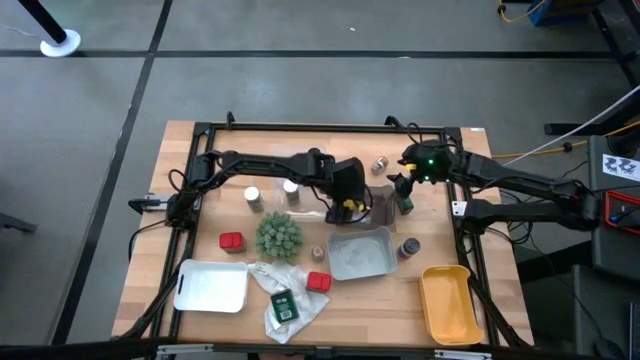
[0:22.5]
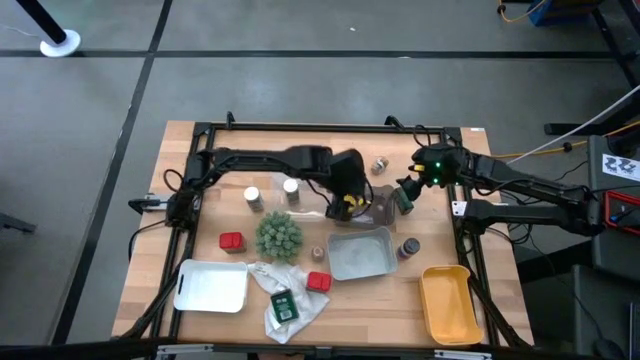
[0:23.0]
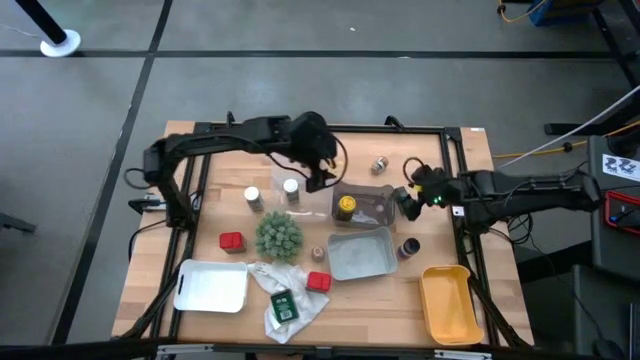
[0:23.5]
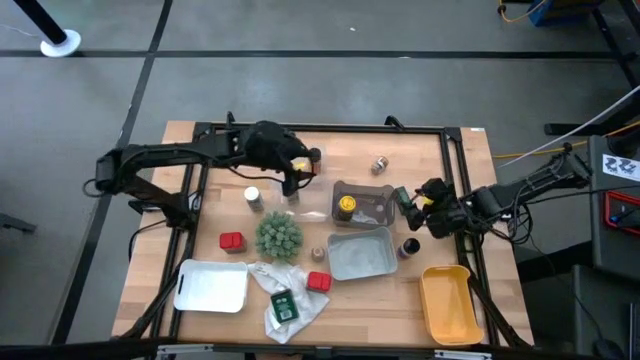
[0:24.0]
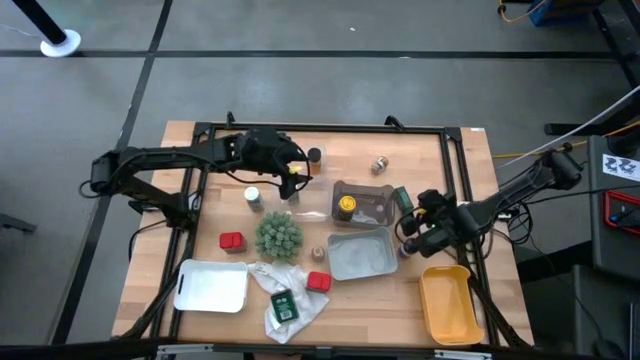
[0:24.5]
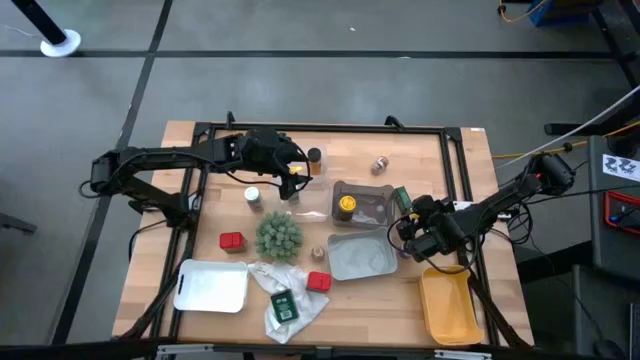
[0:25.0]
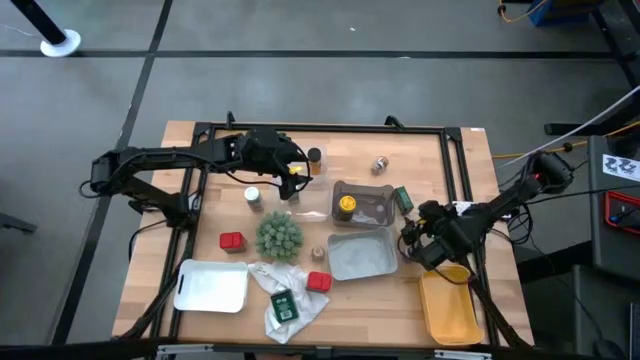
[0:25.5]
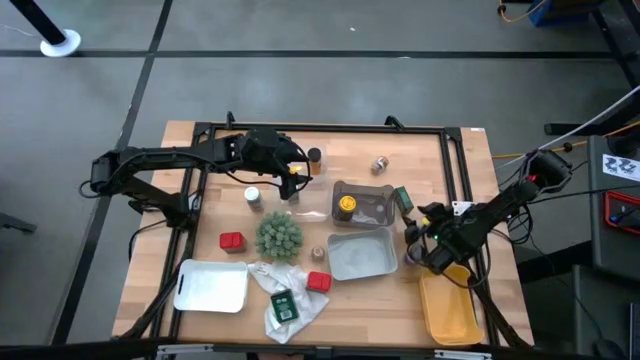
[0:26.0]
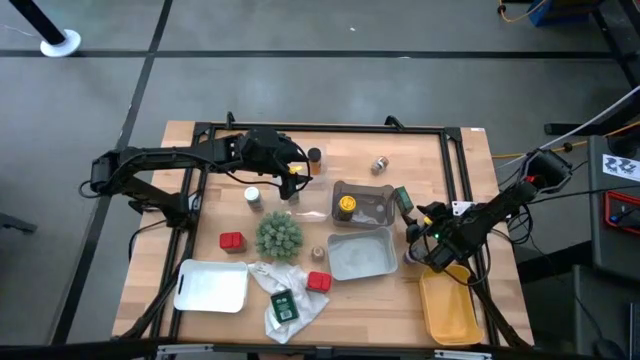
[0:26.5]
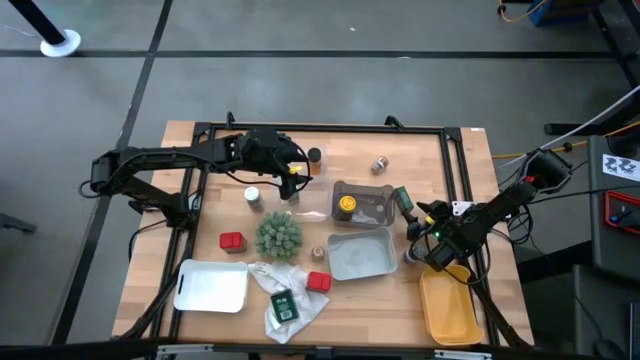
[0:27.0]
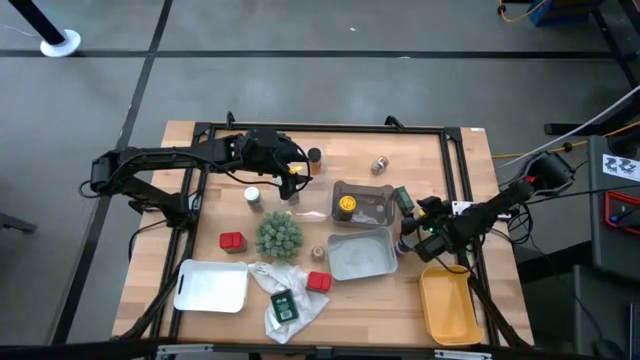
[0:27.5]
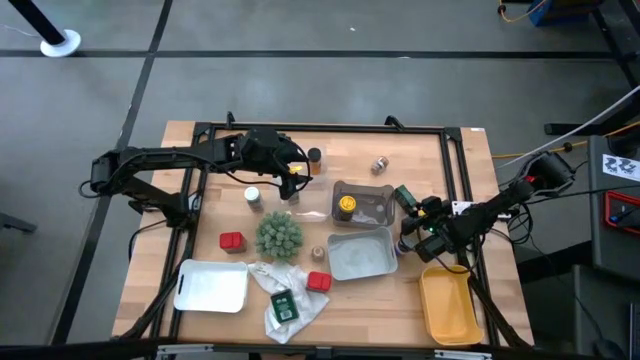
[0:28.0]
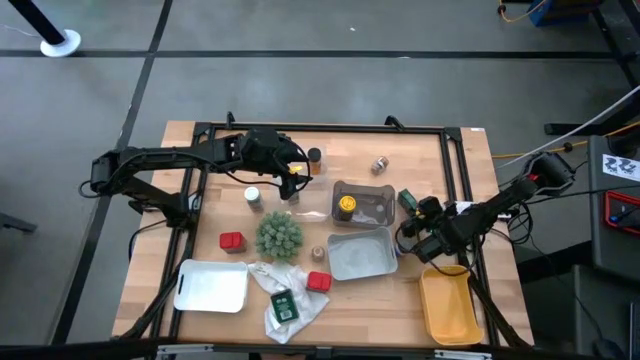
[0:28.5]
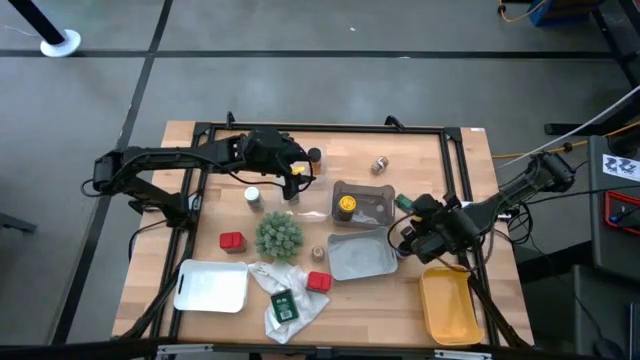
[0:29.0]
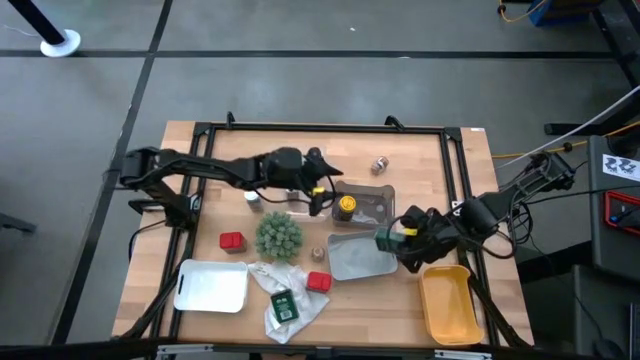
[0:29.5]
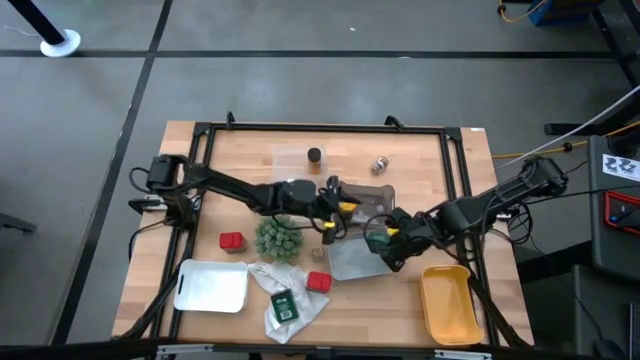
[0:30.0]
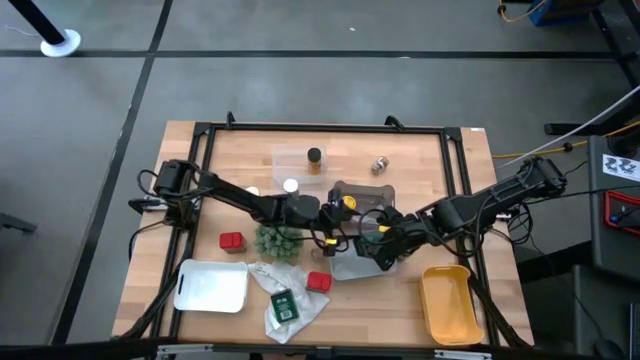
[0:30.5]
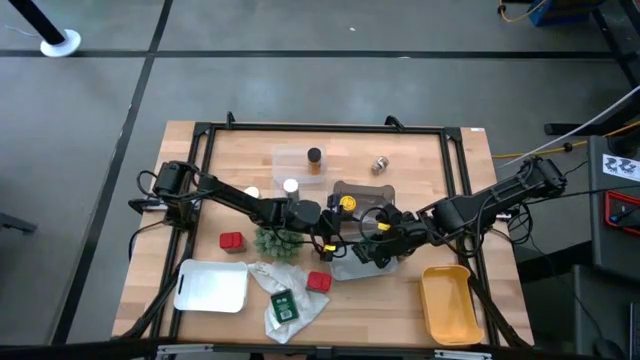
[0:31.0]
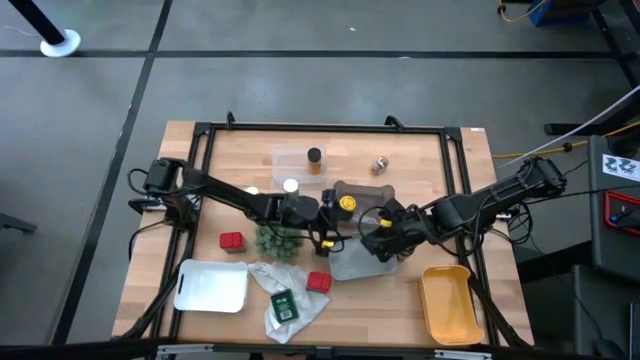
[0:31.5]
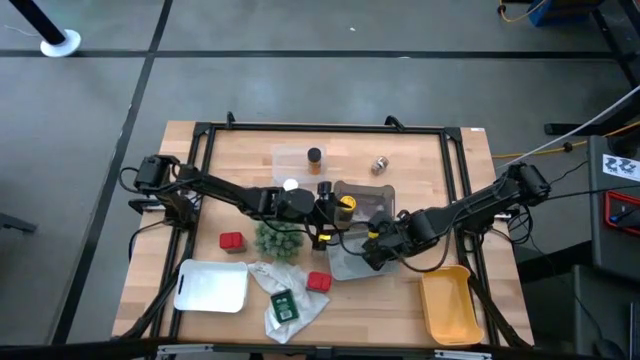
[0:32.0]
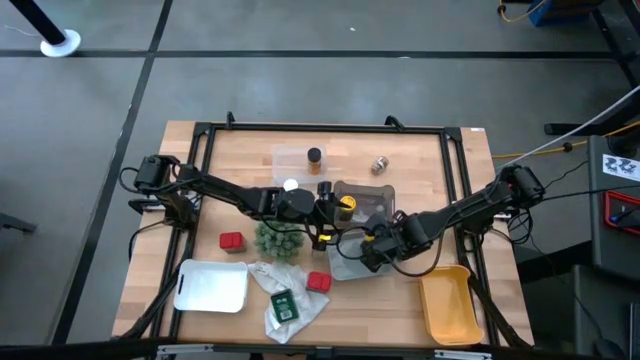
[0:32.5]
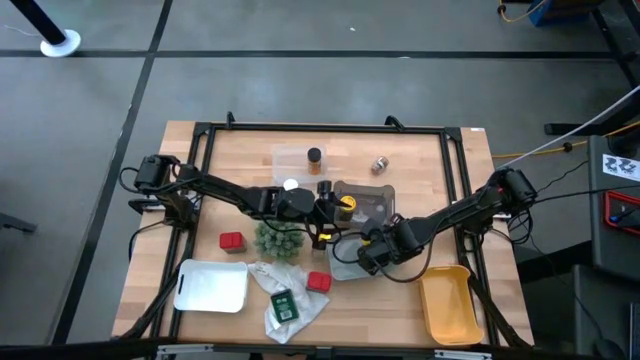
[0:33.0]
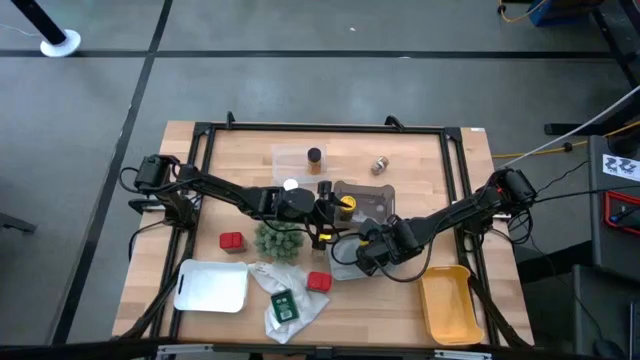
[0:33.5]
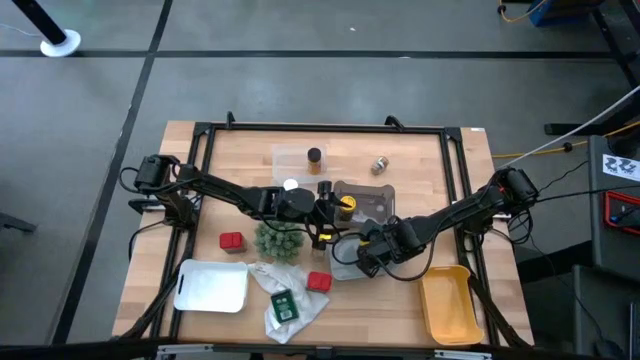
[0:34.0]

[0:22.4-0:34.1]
Task: Sort spices by type
Put the top green seasoning can into the gray bin

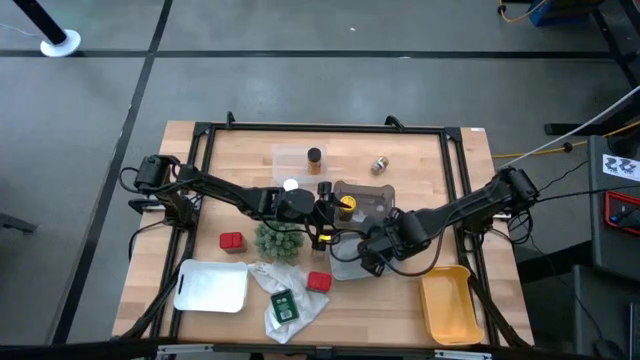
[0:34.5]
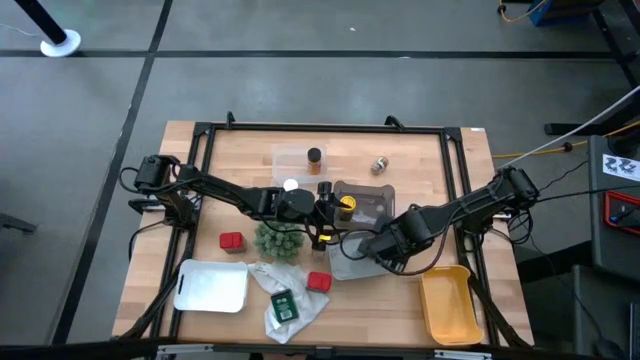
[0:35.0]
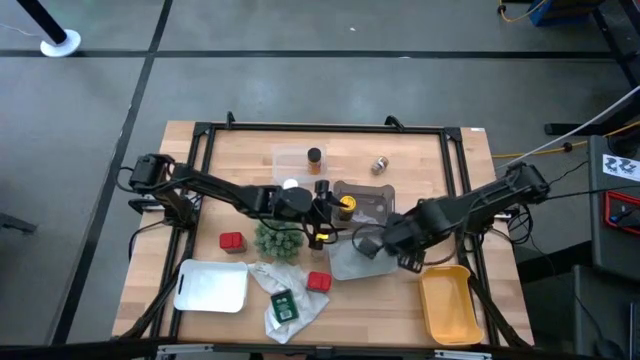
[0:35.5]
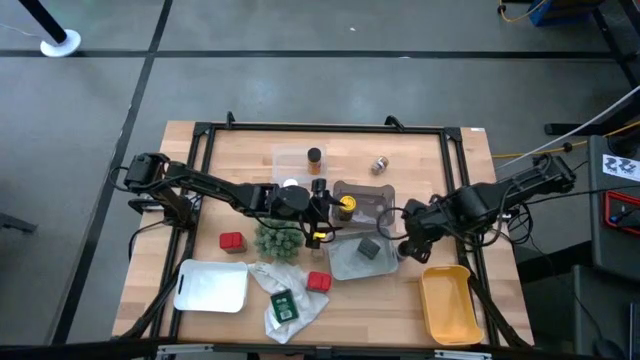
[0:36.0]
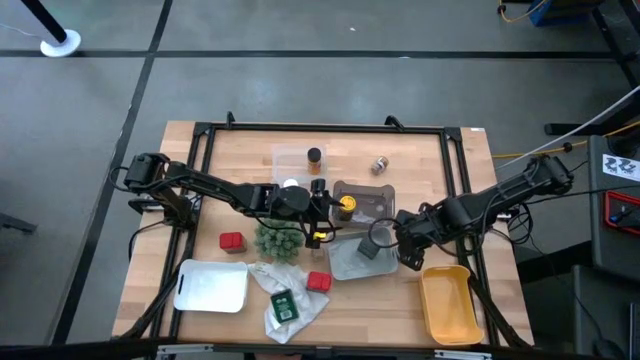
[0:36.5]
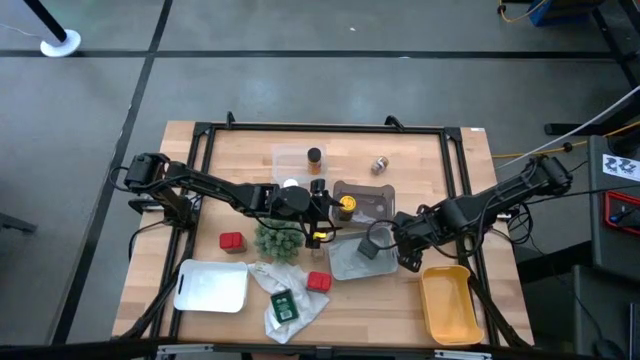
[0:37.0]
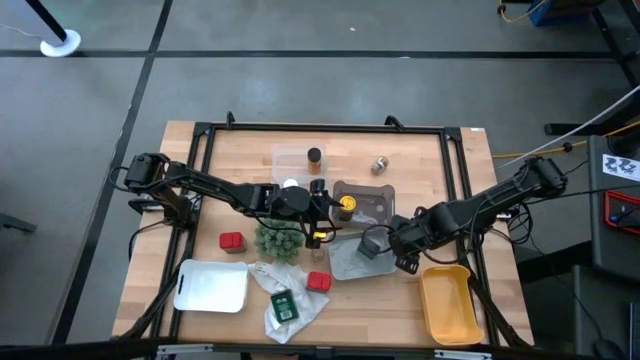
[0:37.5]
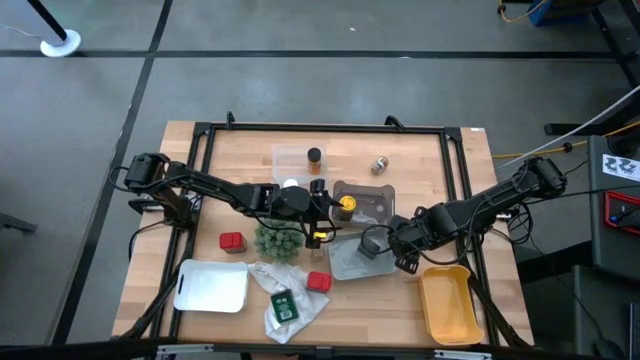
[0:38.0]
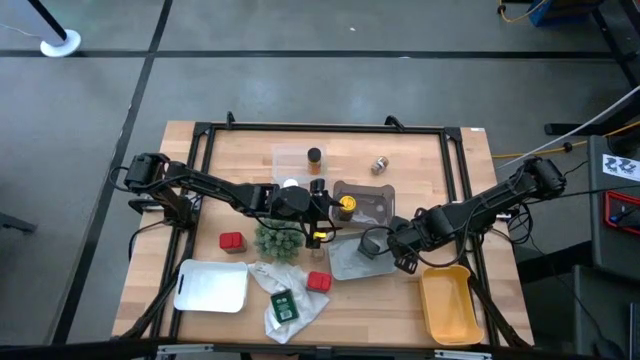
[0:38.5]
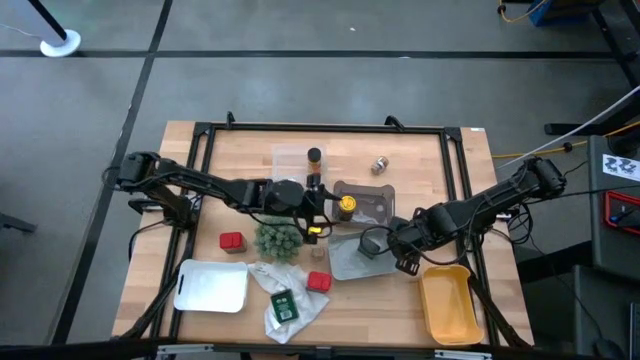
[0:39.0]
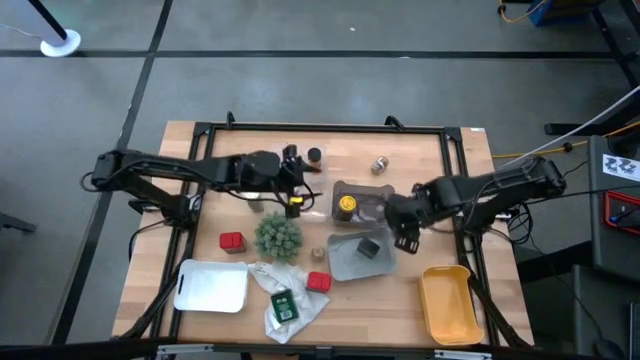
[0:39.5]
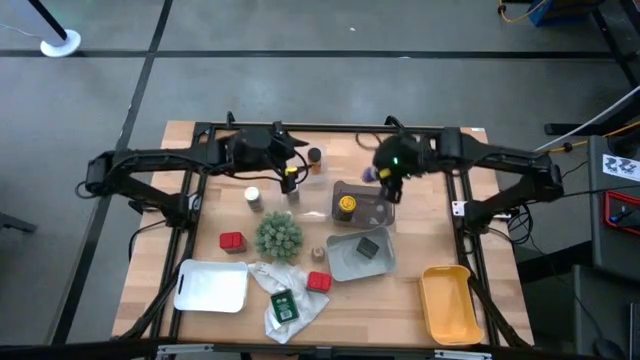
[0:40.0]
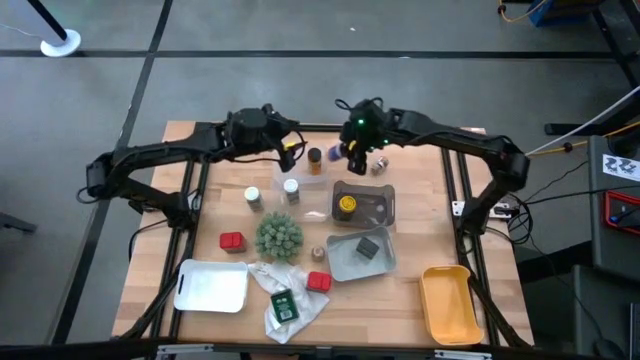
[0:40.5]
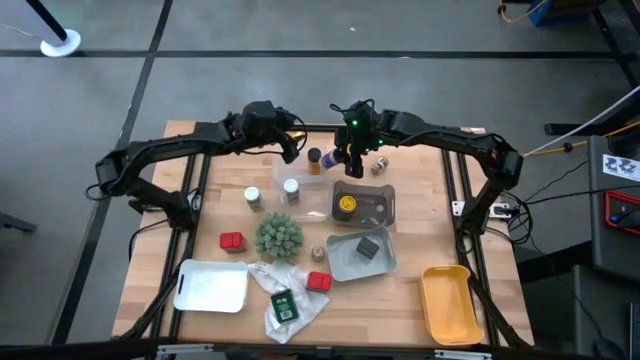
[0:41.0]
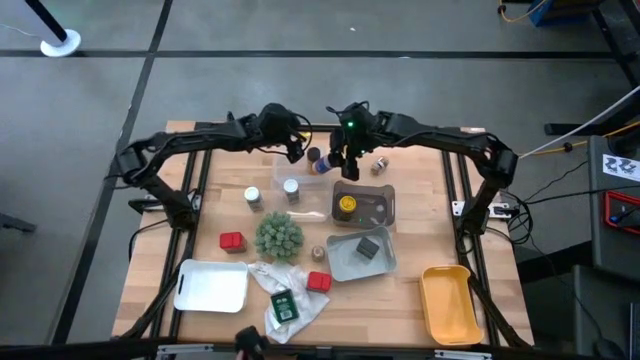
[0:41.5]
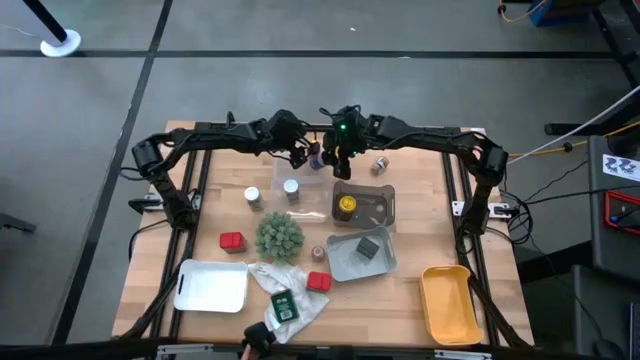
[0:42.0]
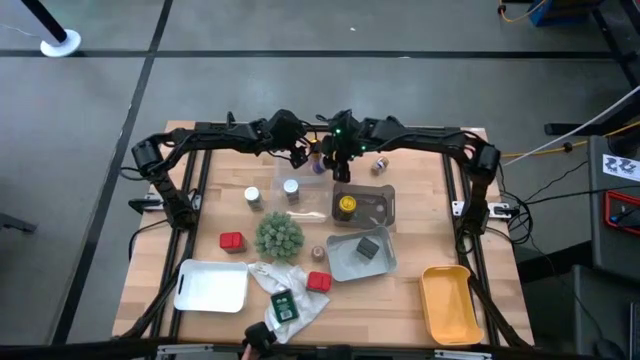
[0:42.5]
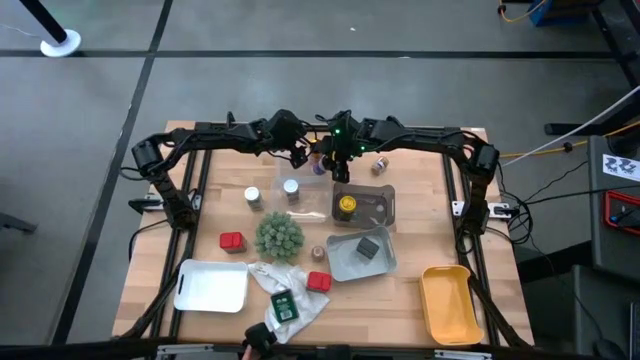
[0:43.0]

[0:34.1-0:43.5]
Put the black seasoning bottle into the top transparent bin aligned with the other black seasoning bottle
